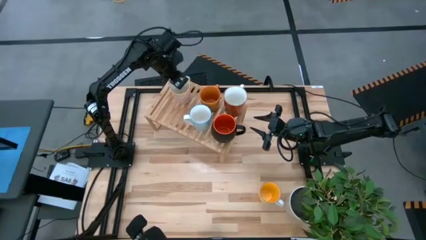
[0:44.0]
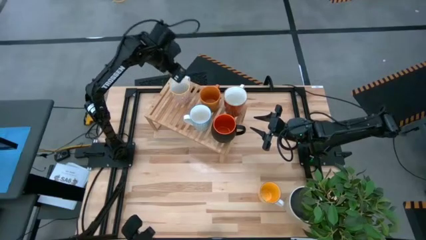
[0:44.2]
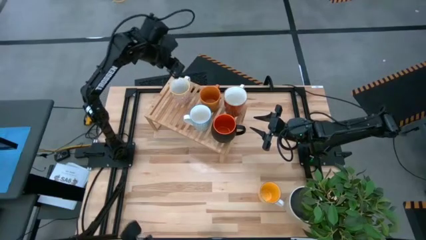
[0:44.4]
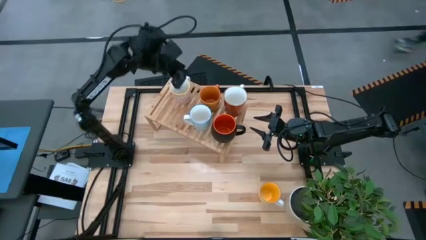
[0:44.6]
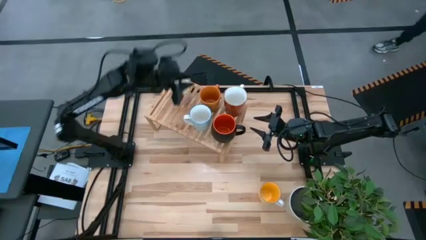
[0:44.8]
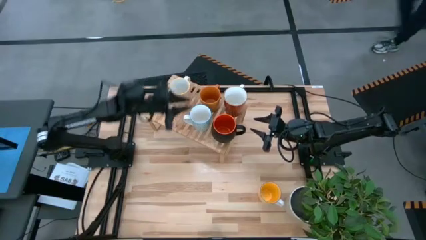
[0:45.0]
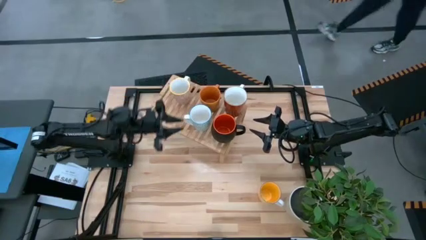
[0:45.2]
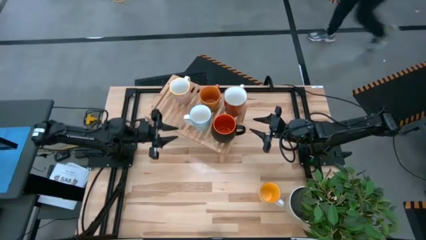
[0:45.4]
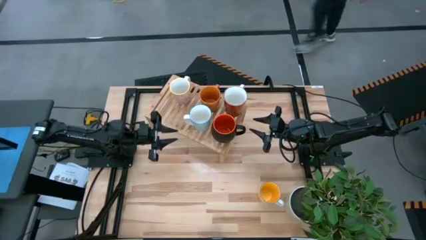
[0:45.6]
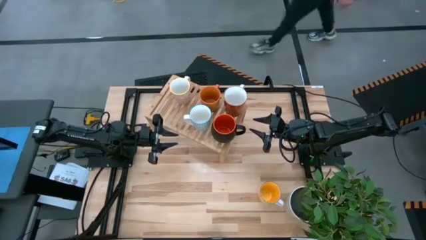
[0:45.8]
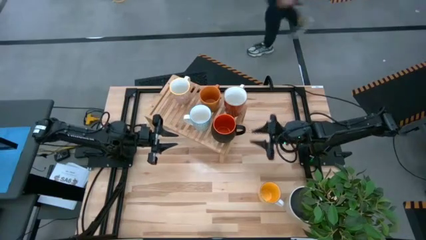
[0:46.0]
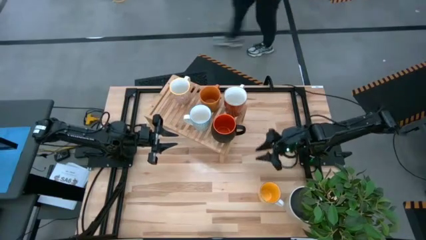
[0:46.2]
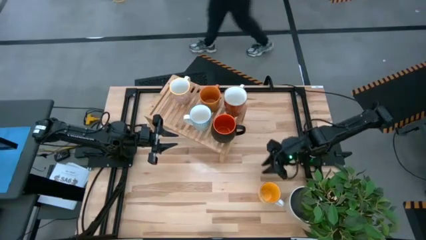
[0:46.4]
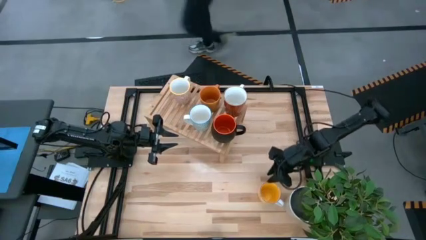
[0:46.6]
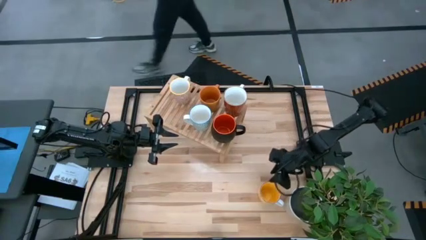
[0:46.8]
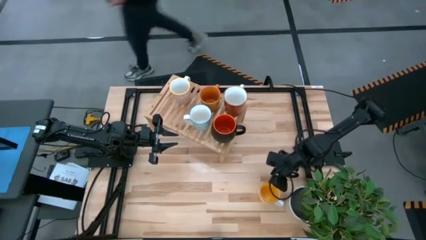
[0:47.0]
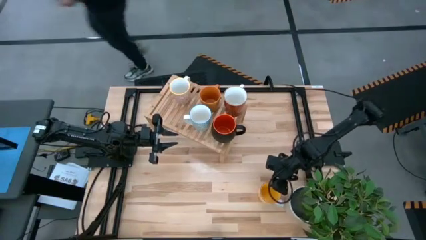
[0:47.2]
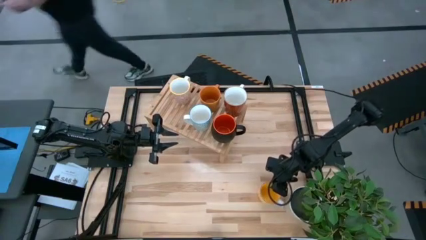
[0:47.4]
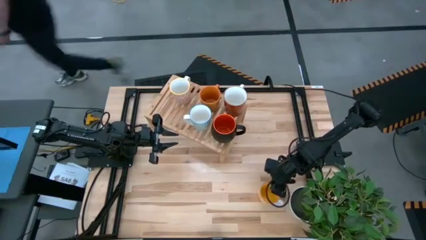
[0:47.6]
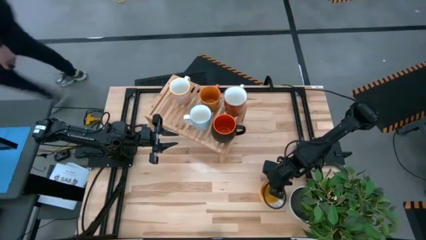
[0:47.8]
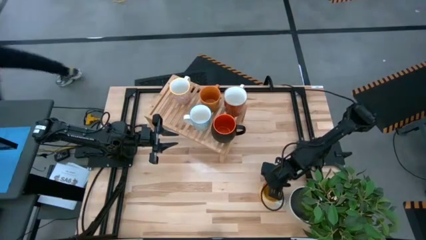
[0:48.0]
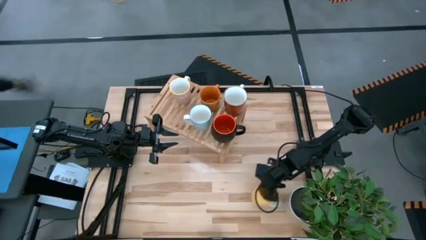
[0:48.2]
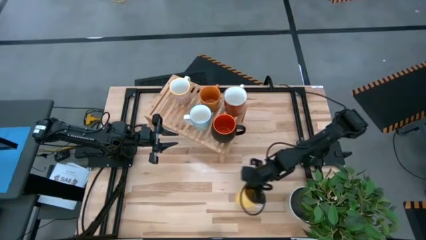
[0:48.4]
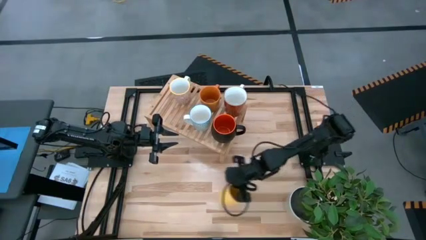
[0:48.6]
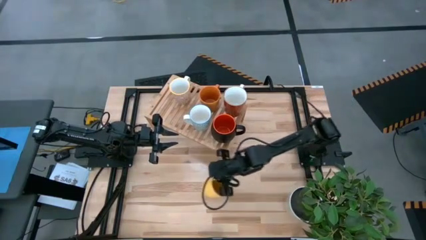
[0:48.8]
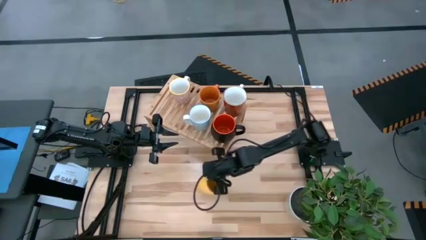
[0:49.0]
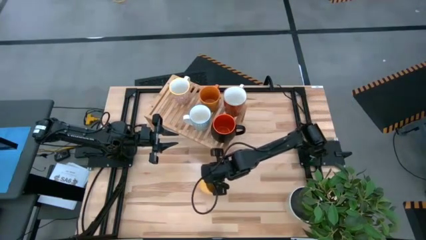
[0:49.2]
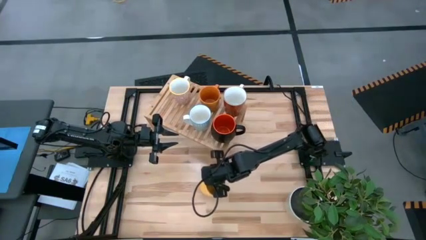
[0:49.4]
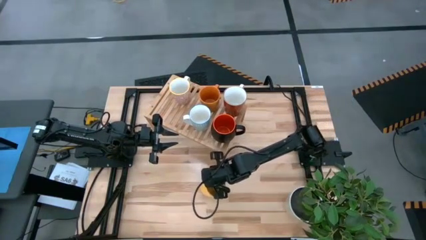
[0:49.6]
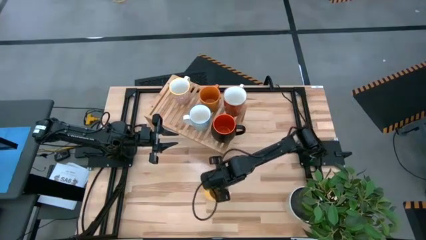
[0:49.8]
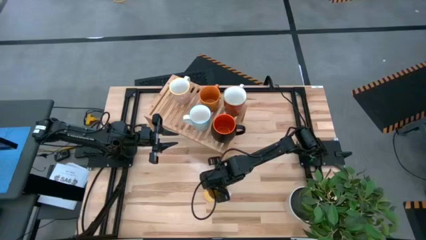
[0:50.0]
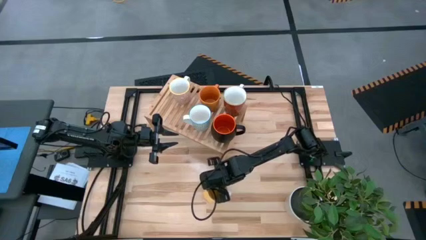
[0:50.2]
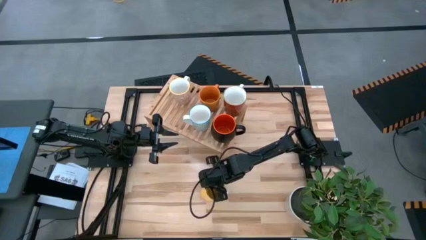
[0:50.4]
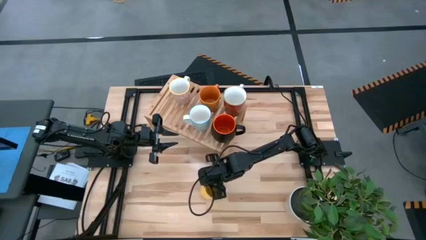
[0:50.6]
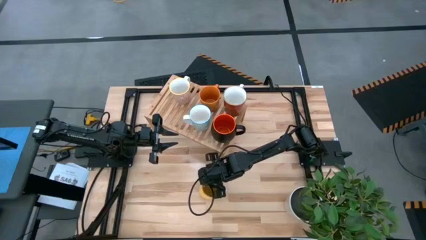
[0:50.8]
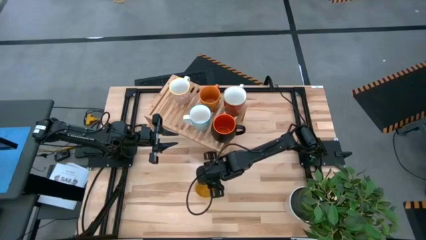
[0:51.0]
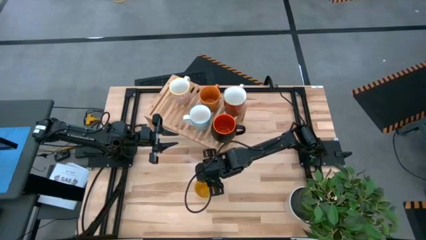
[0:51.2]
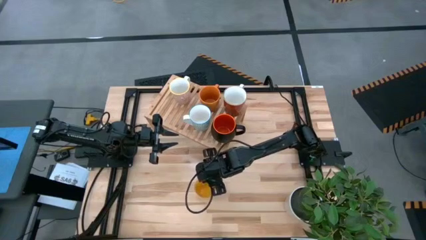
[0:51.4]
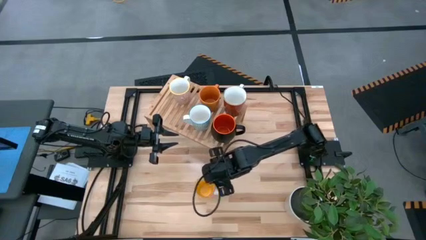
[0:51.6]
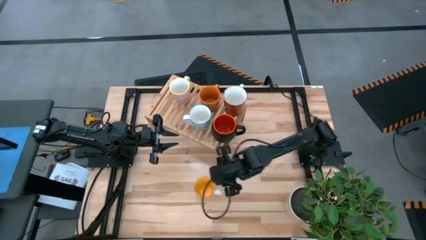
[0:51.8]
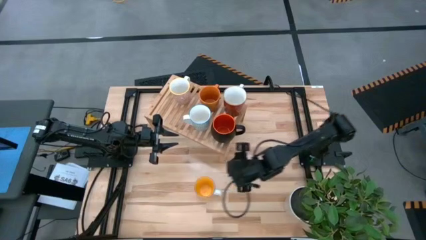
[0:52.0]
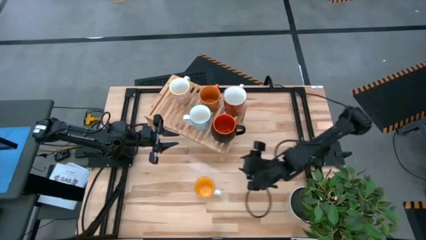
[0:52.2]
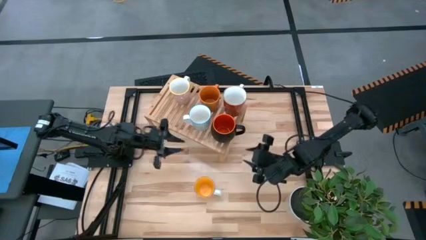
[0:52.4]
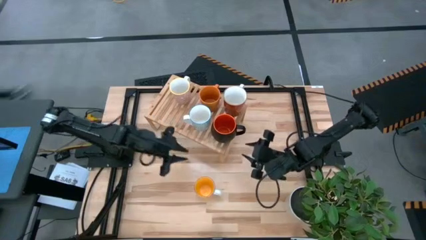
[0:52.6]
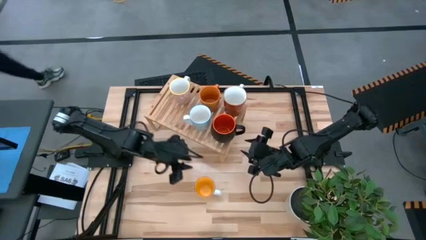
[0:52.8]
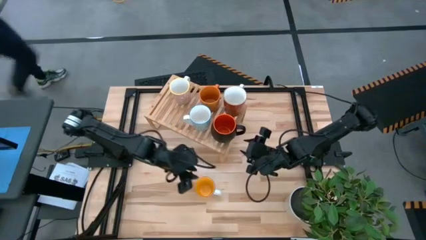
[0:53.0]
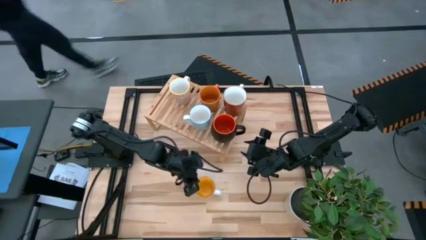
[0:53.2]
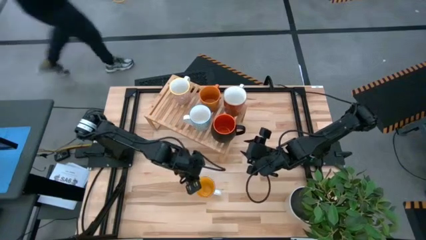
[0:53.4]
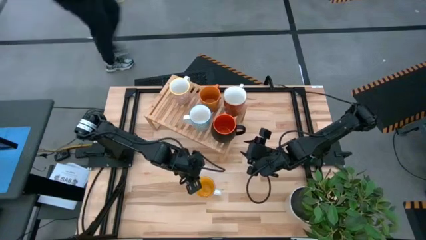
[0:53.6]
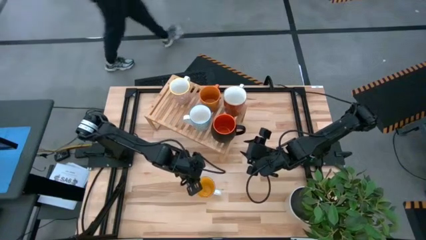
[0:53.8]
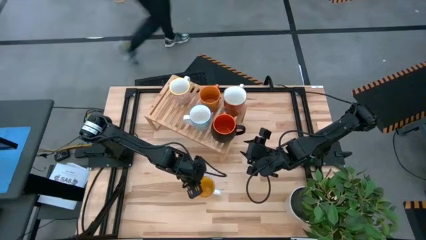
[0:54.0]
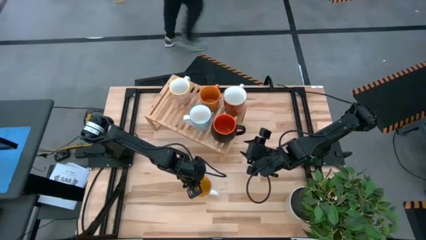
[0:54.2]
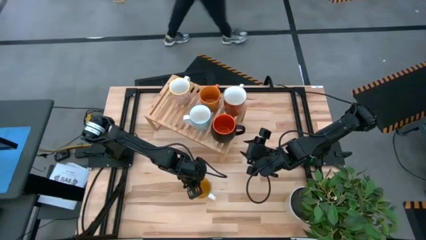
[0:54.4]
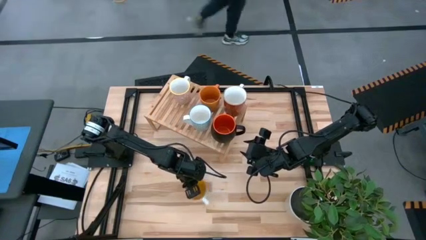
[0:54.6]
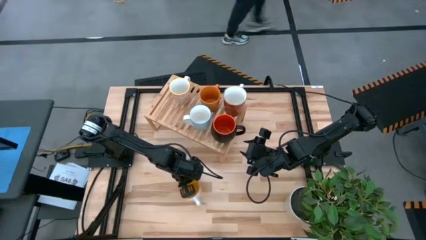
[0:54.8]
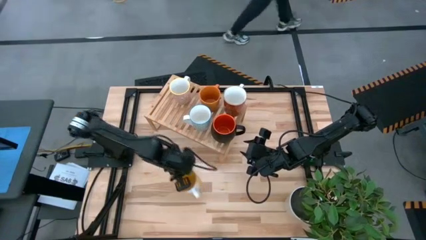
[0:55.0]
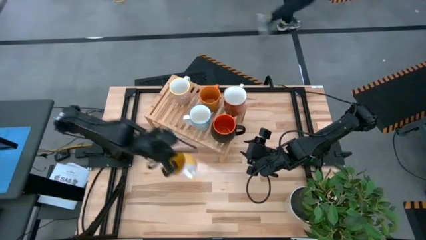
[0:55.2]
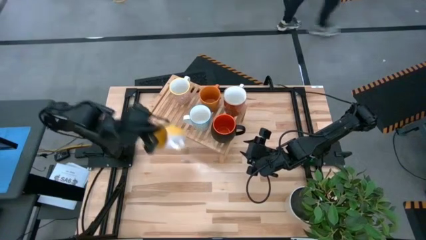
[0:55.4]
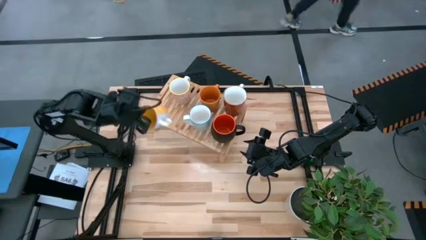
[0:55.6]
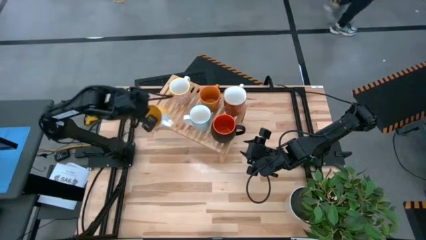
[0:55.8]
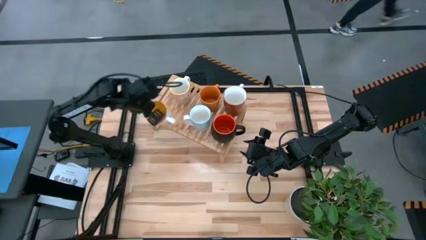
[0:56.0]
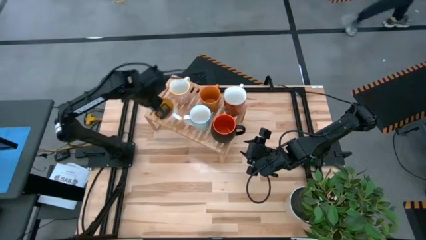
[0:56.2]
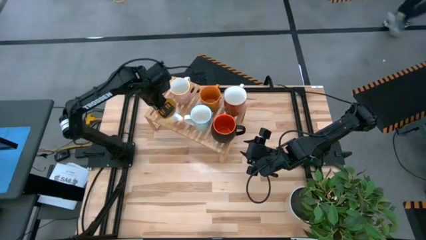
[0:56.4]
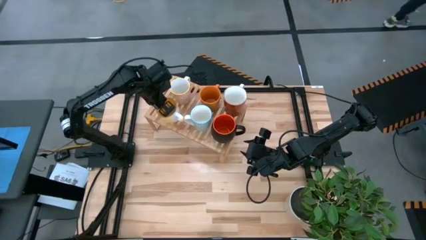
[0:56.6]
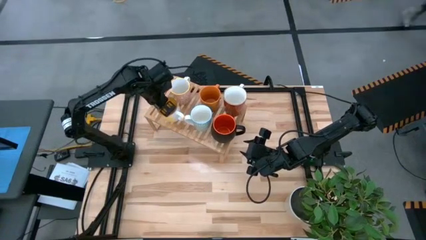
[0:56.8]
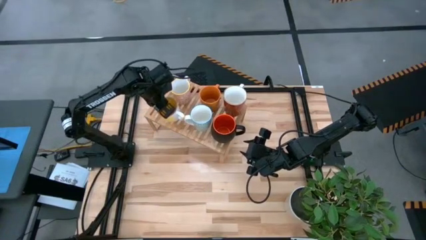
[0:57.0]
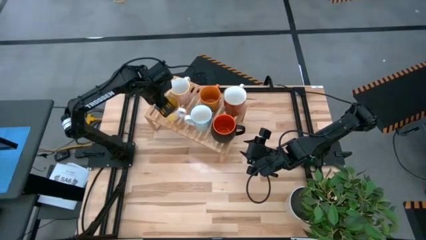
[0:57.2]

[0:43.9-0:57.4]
Task: Place coffee mugs
Put the yellow mug on the shelf
